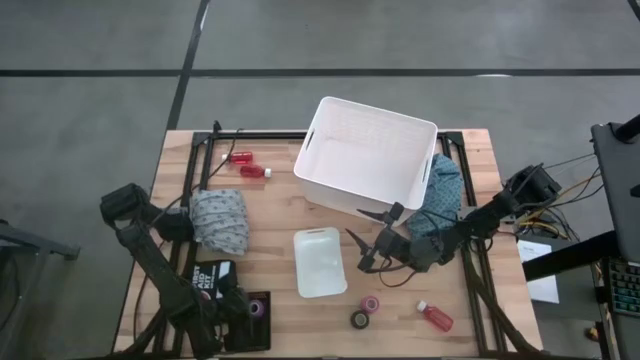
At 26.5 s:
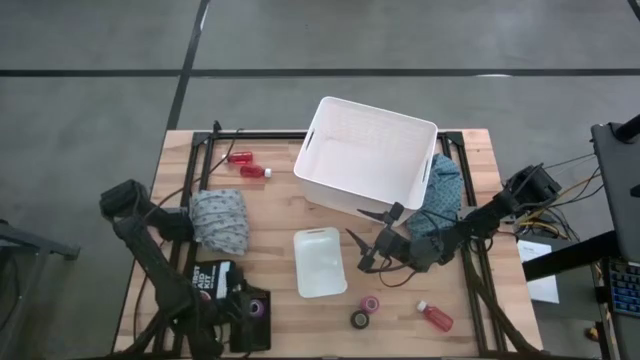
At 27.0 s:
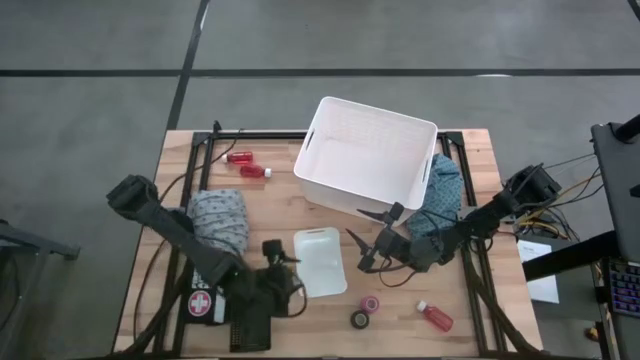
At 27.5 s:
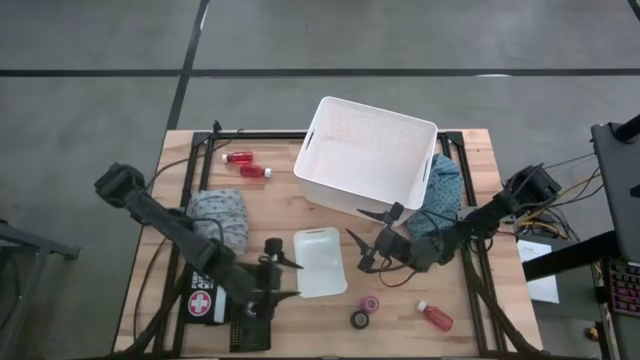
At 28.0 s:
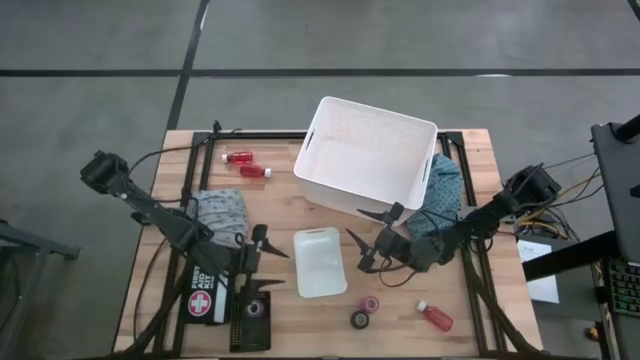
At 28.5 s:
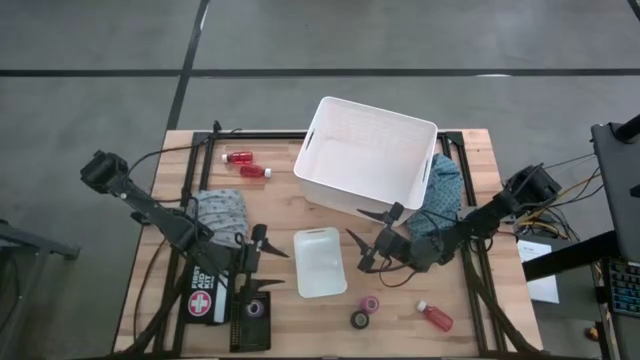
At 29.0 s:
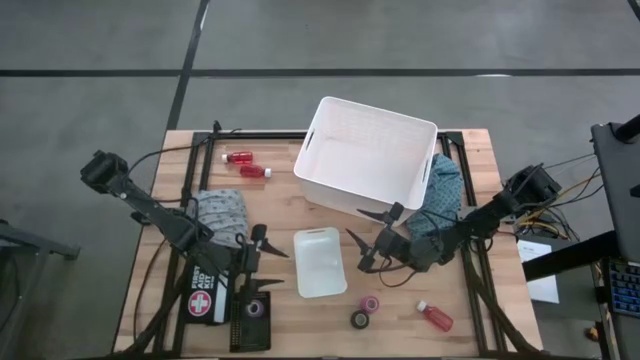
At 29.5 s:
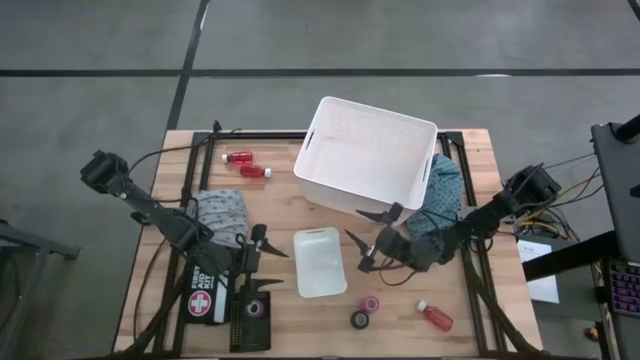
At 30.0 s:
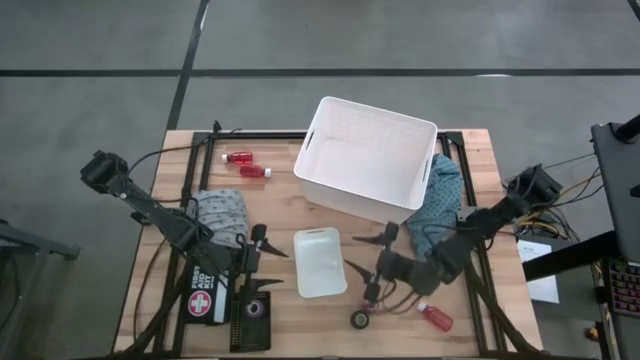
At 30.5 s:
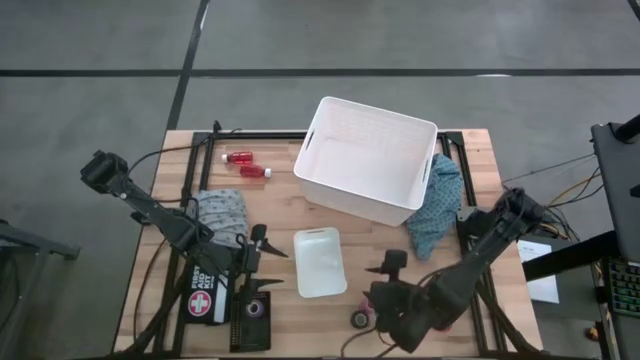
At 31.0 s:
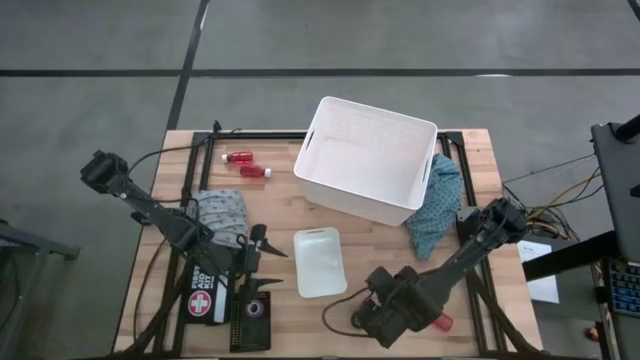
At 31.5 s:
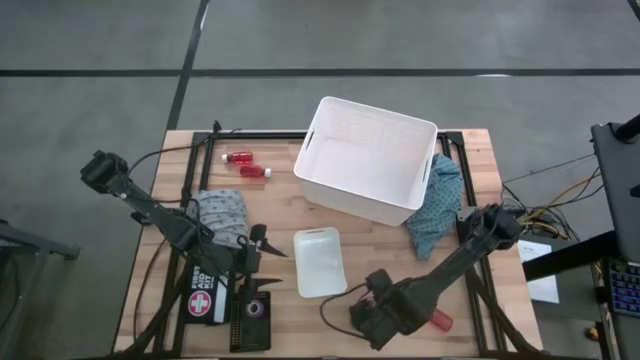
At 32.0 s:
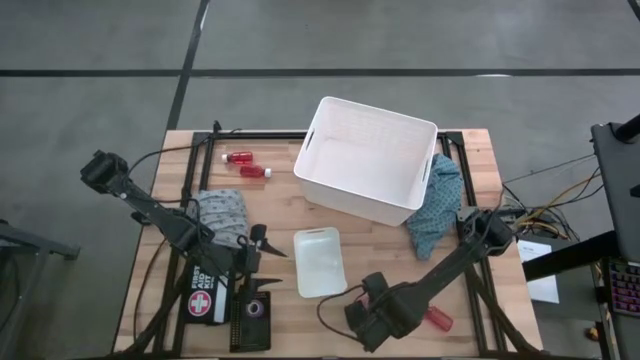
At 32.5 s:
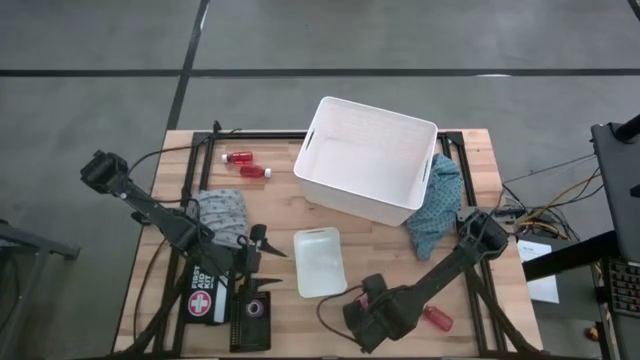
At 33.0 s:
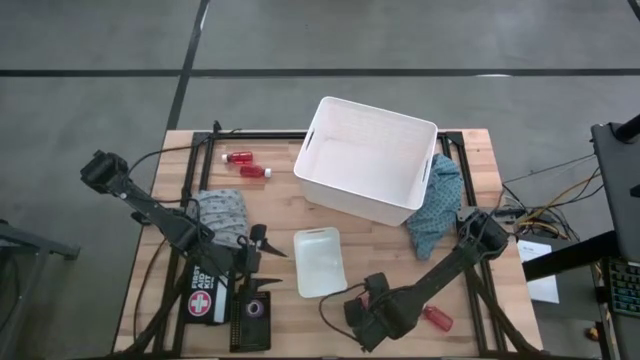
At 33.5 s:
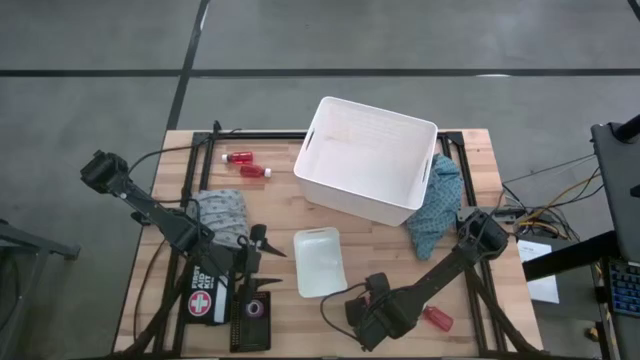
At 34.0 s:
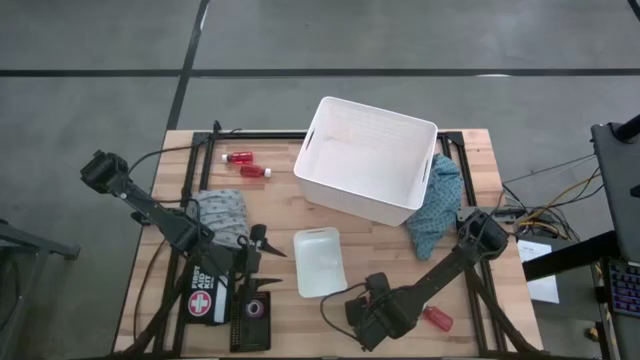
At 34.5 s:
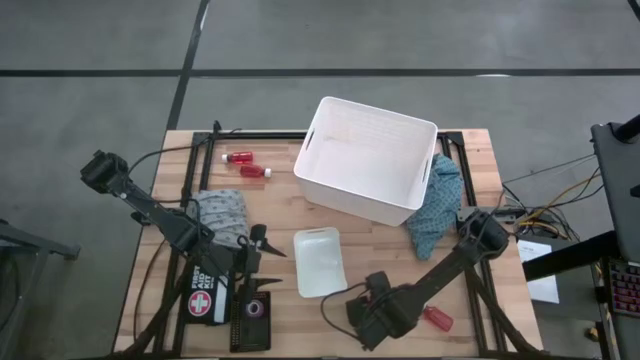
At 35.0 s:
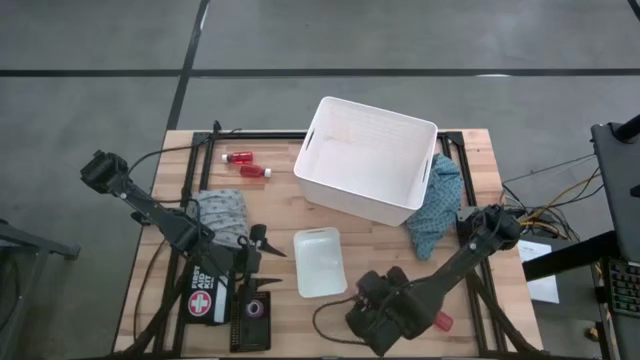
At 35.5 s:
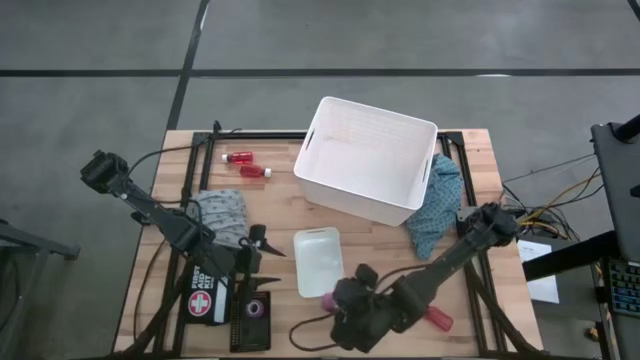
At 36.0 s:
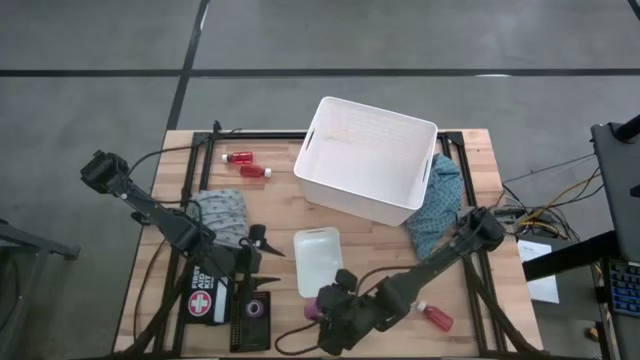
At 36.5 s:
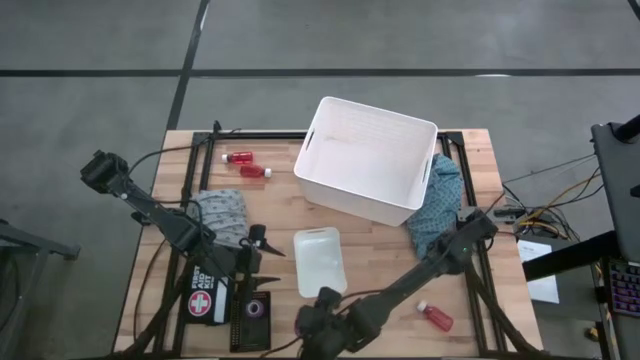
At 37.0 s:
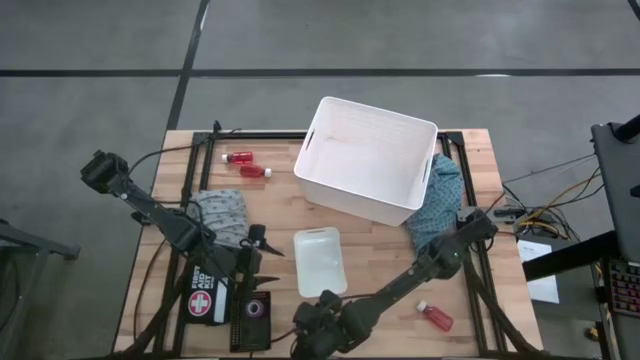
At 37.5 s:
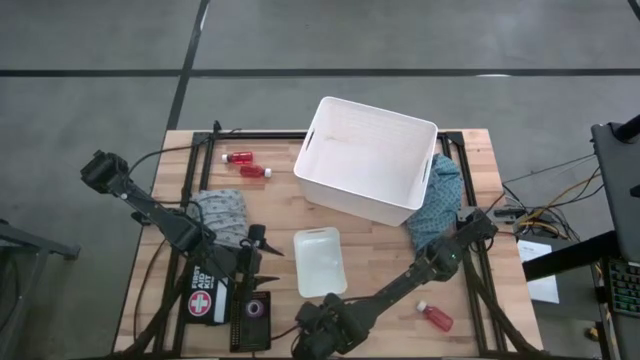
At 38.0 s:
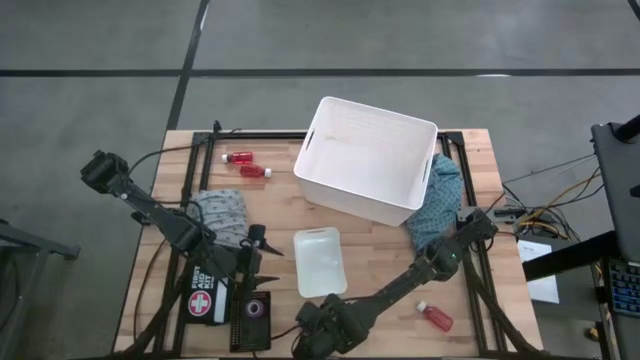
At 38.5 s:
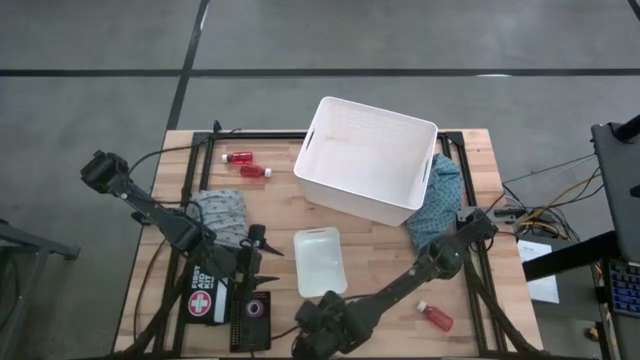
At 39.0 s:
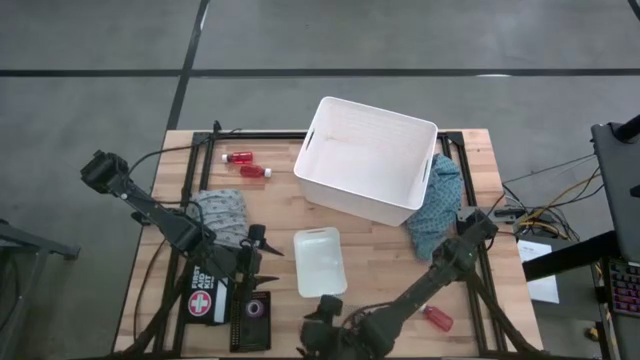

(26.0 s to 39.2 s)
Task: Pick & Place Medicine items
Put the pink bandage into the black bin

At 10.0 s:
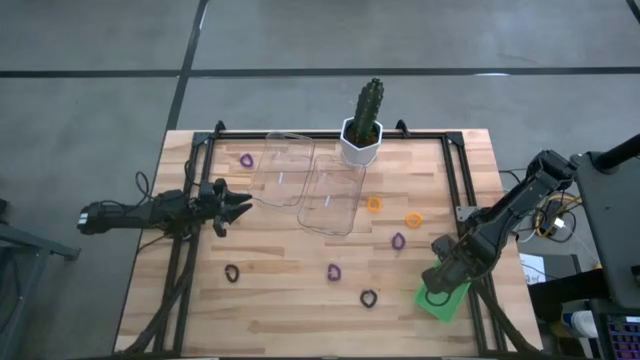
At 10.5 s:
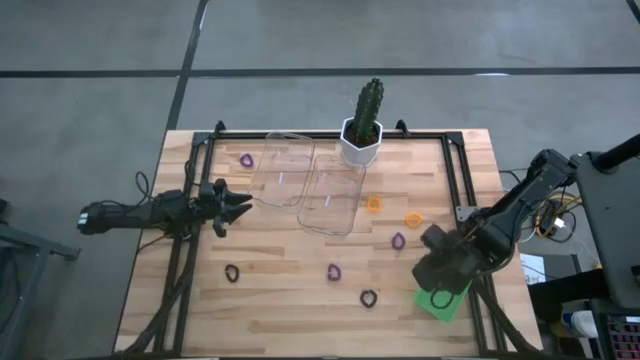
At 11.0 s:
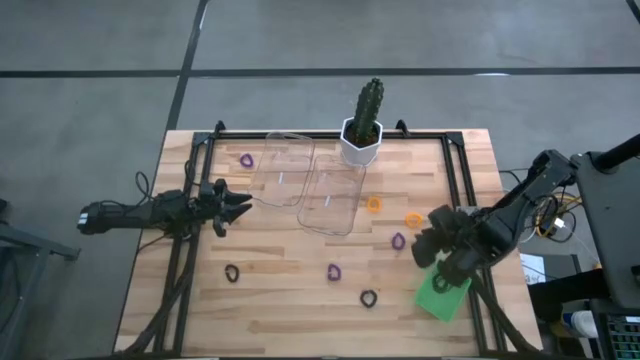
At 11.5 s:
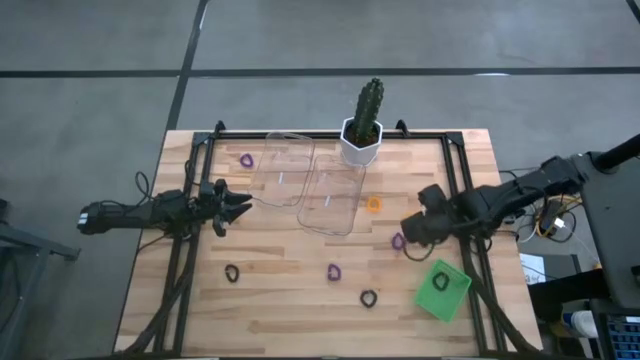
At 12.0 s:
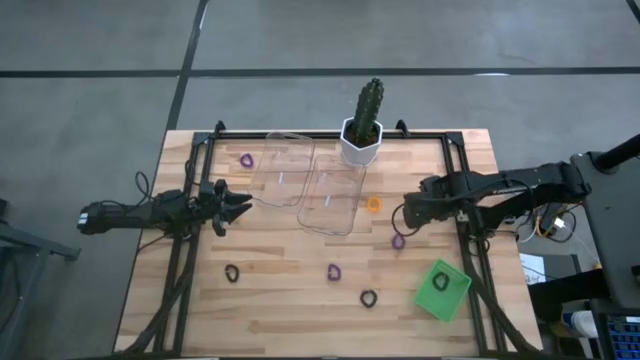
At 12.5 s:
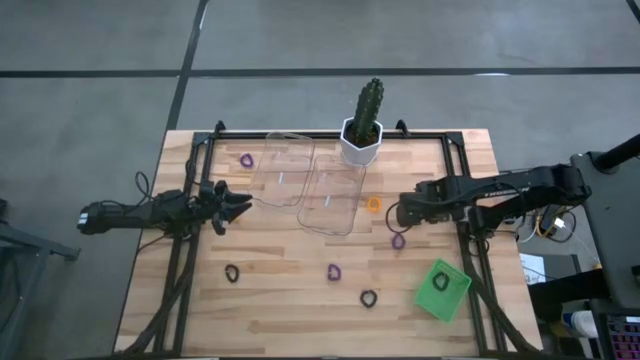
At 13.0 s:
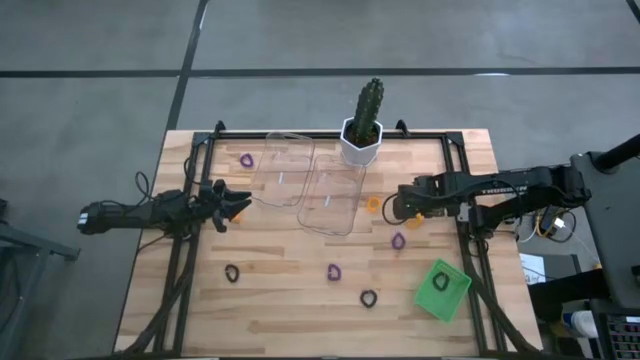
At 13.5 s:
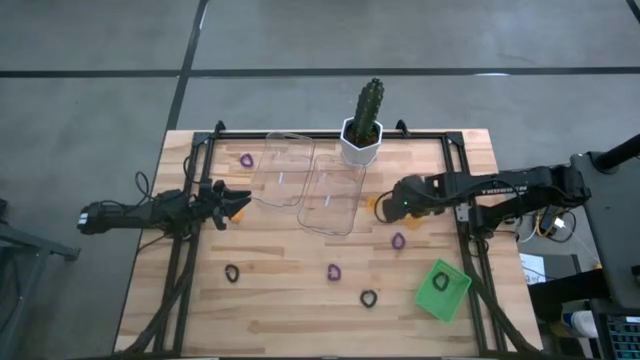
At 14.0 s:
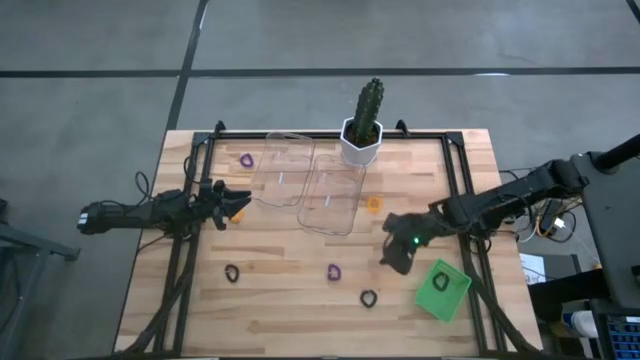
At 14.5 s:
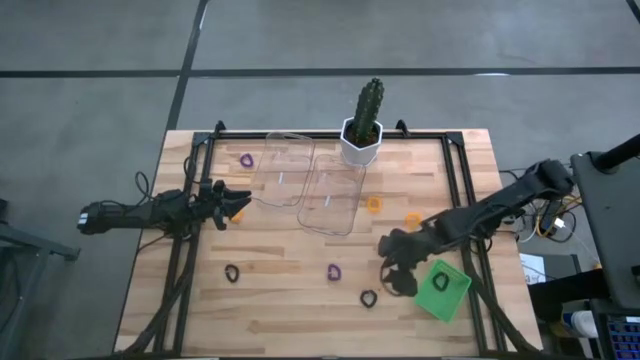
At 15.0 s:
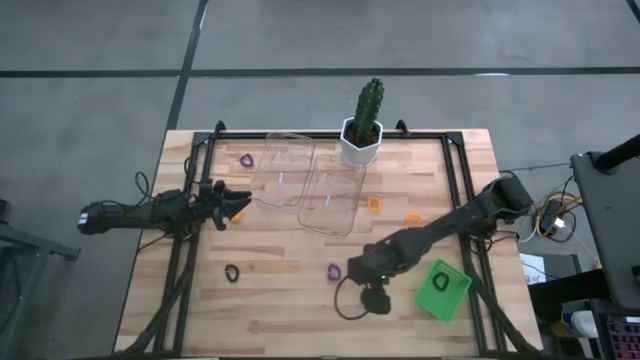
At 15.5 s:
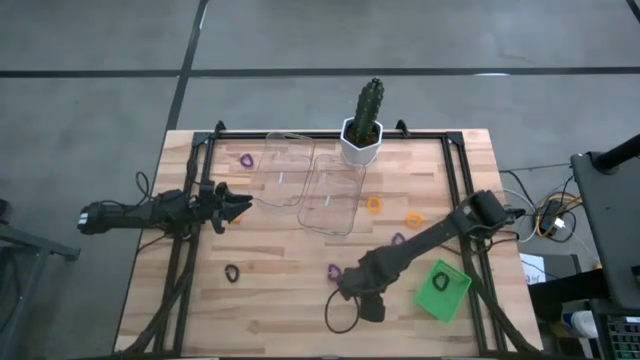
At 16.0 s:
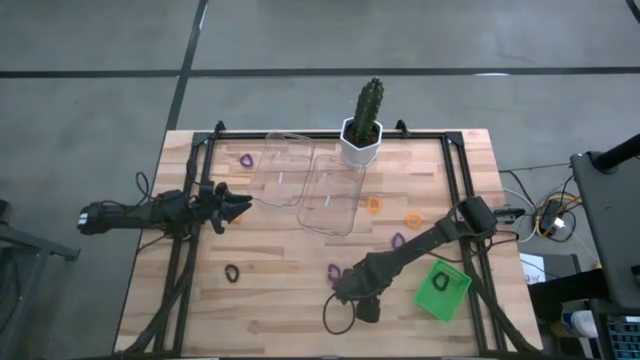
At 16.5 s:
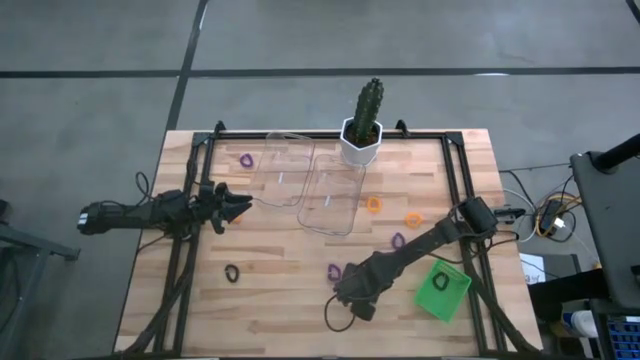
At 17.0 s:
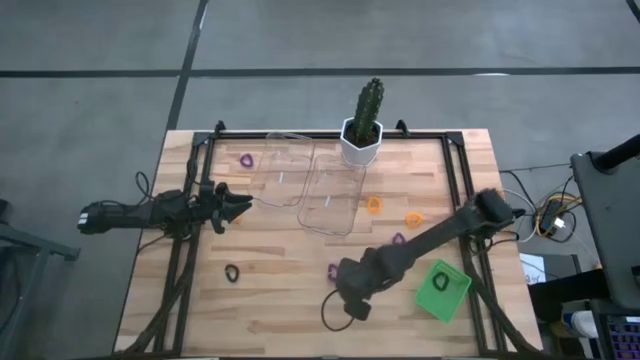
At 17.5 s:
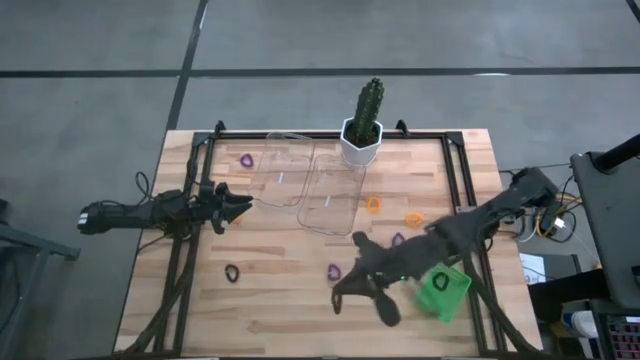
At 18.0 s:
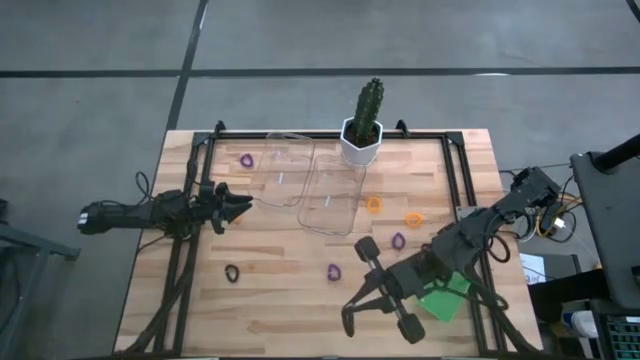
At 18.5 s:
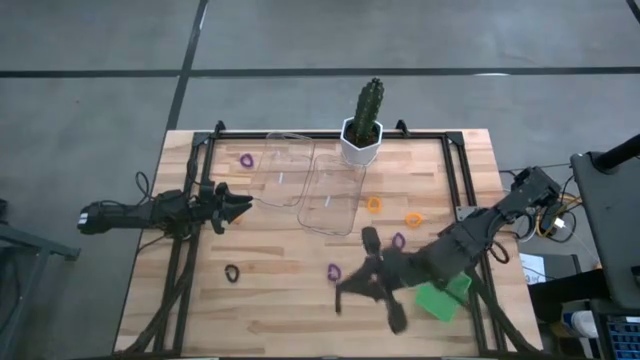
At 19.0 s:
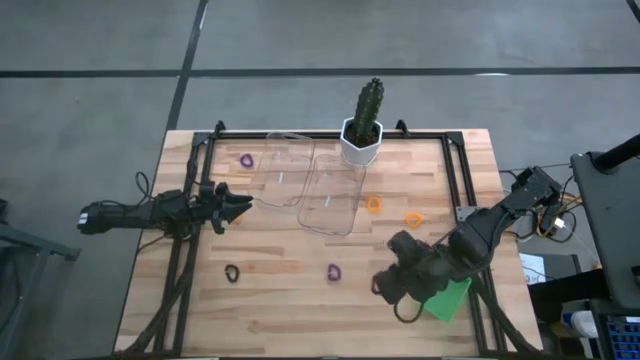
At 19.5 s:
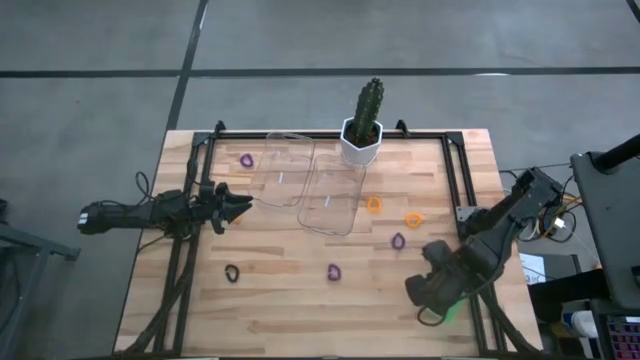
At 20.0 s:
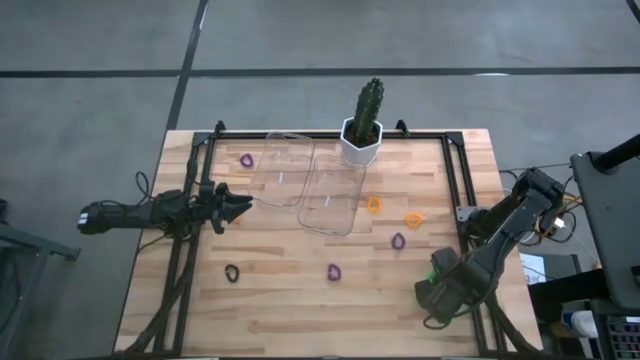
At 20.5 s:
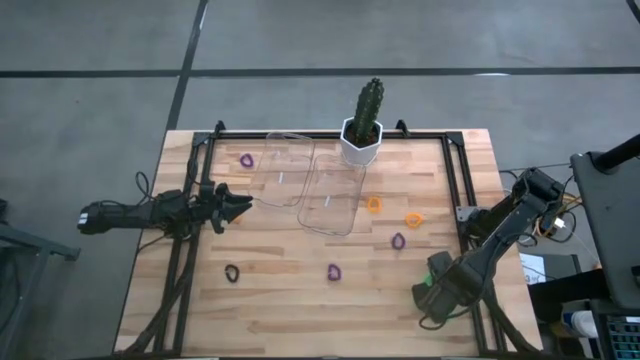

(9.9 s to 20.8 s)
Task: Sort spring keychains
Put the right black spring keychain into the green basket
